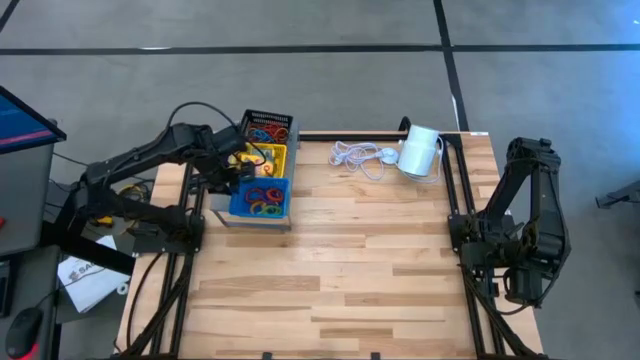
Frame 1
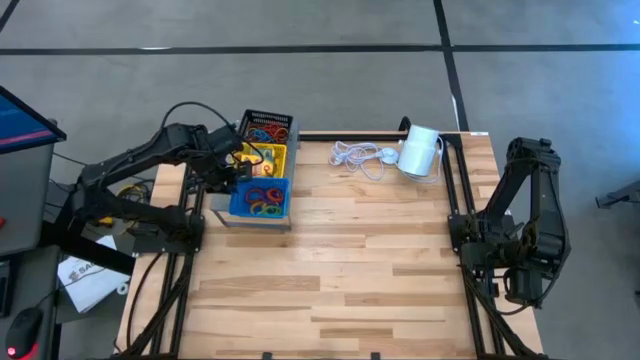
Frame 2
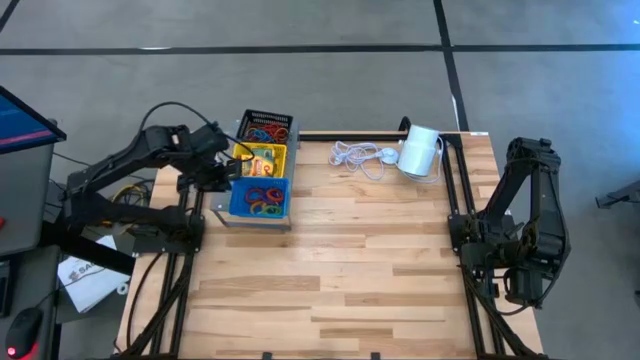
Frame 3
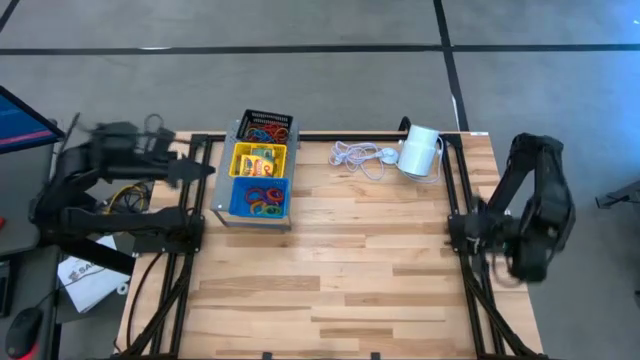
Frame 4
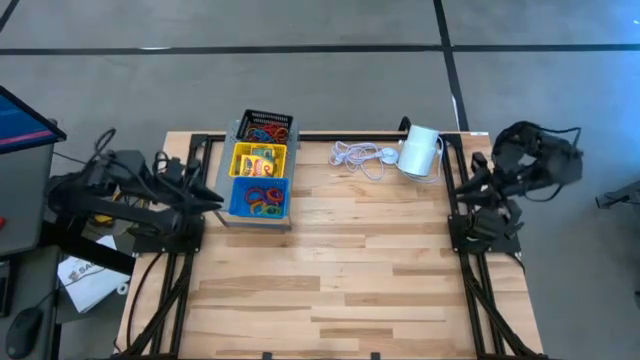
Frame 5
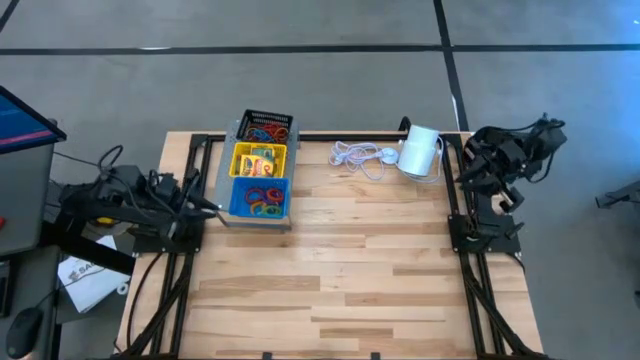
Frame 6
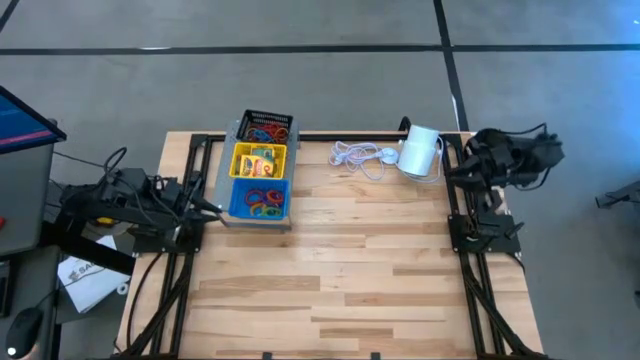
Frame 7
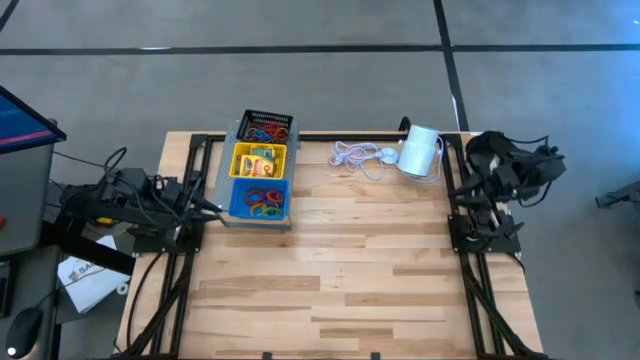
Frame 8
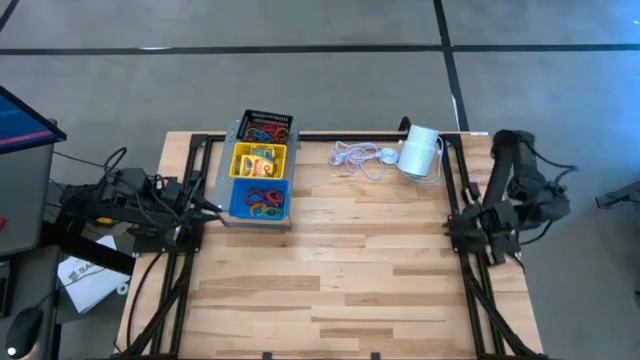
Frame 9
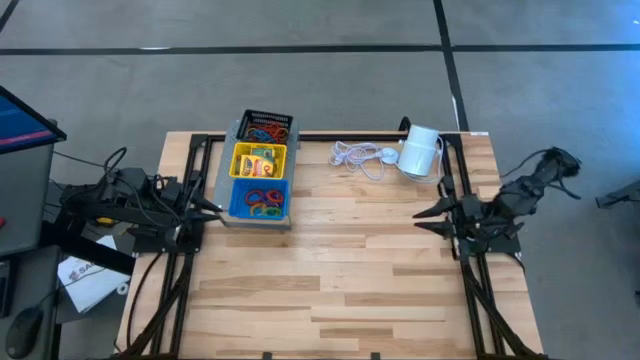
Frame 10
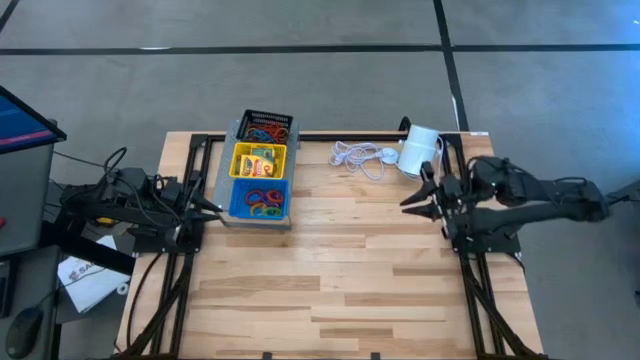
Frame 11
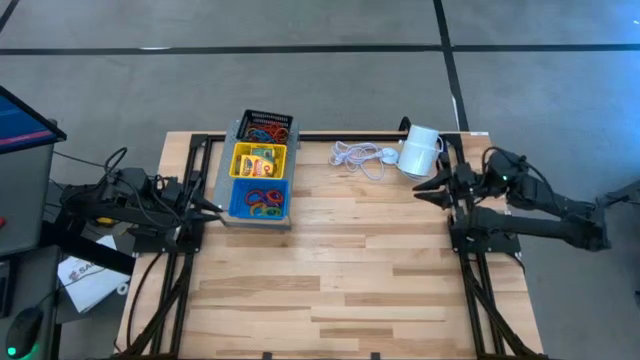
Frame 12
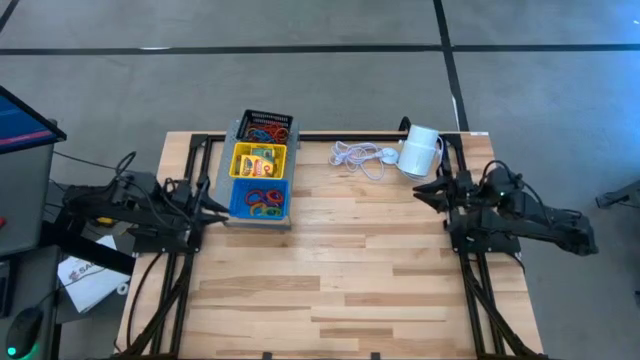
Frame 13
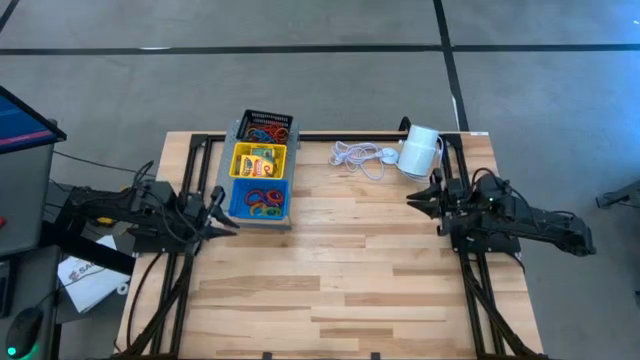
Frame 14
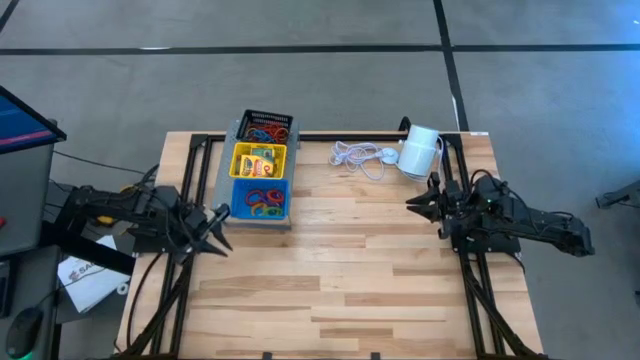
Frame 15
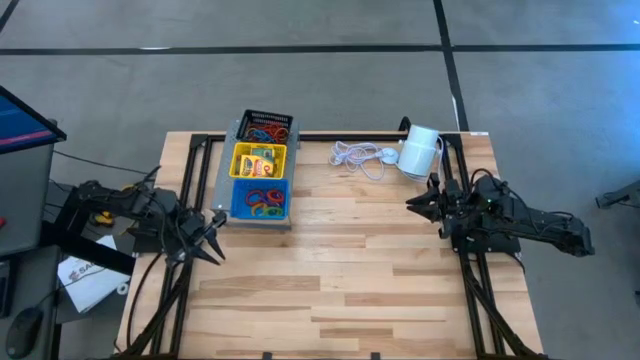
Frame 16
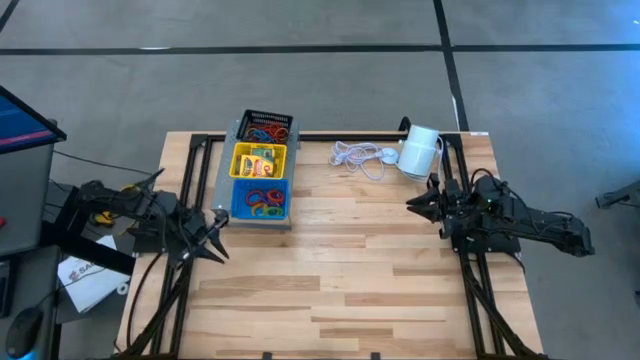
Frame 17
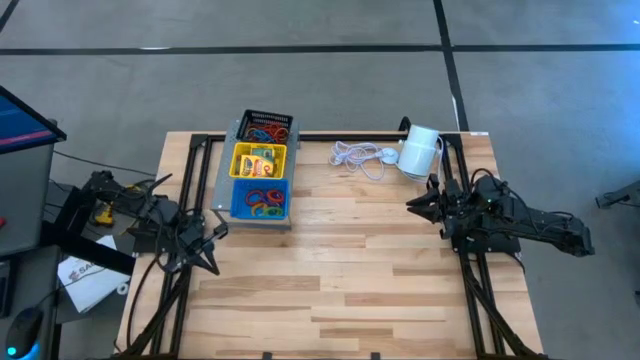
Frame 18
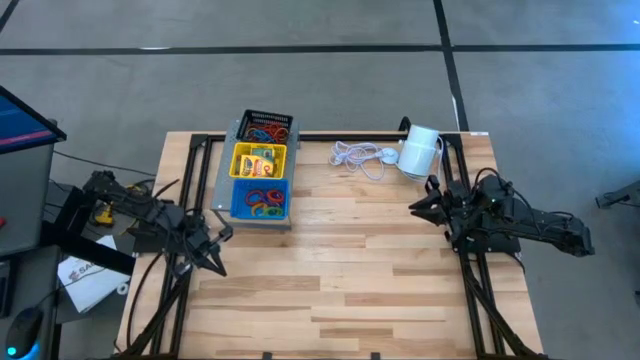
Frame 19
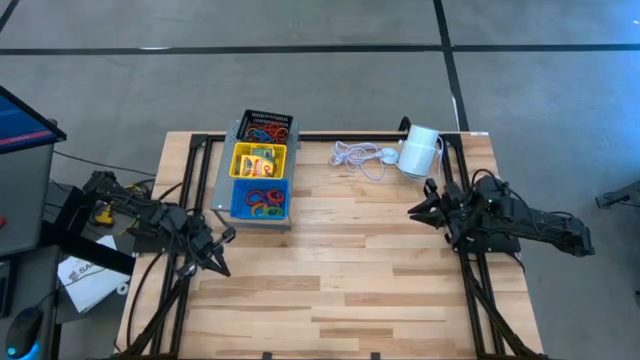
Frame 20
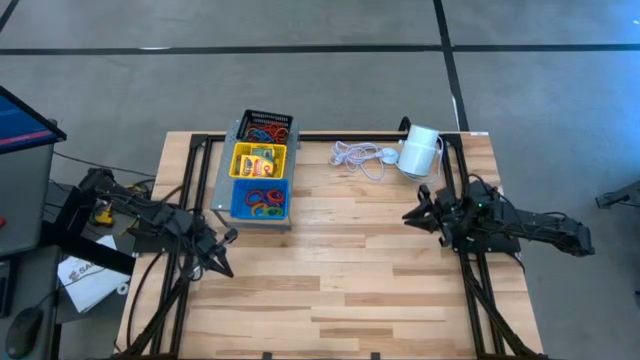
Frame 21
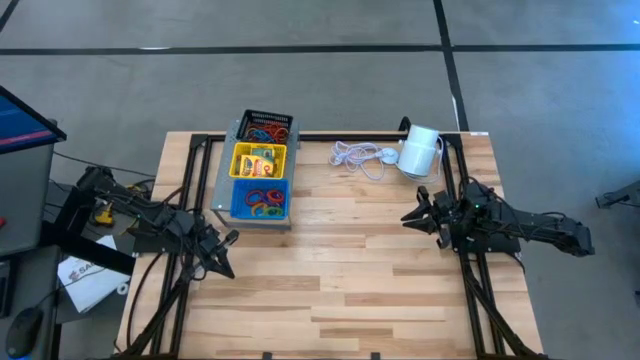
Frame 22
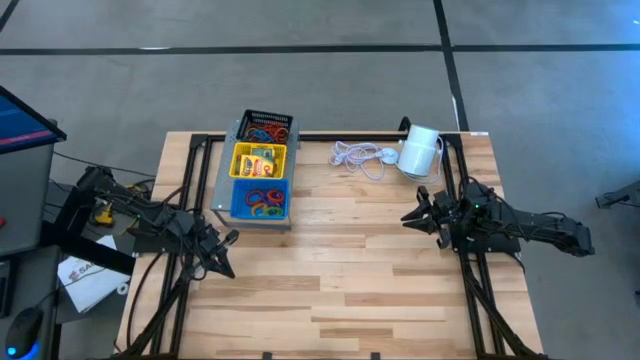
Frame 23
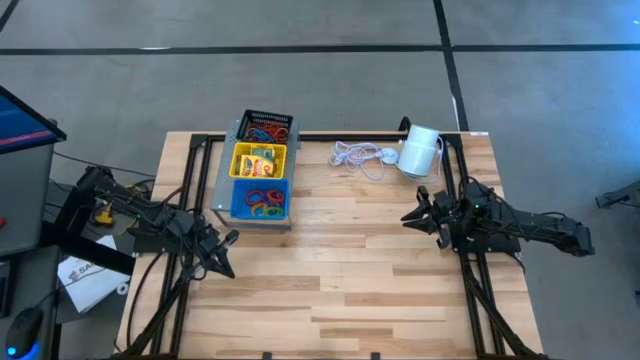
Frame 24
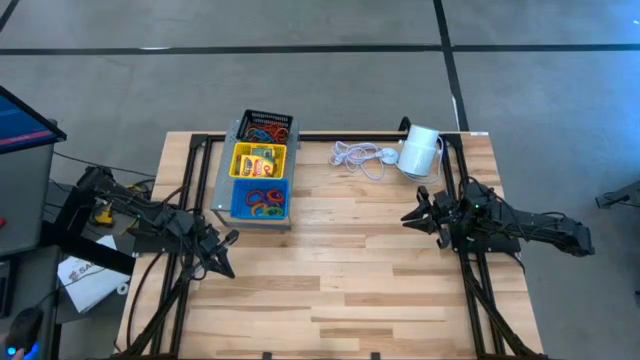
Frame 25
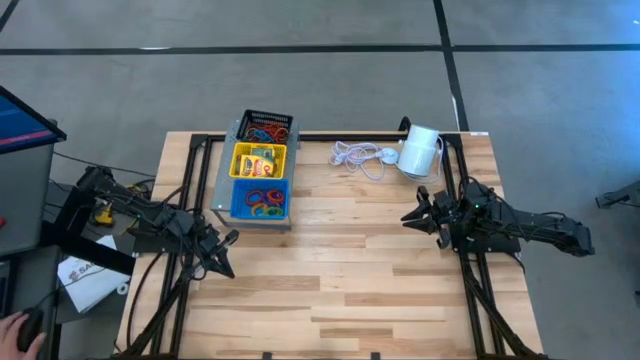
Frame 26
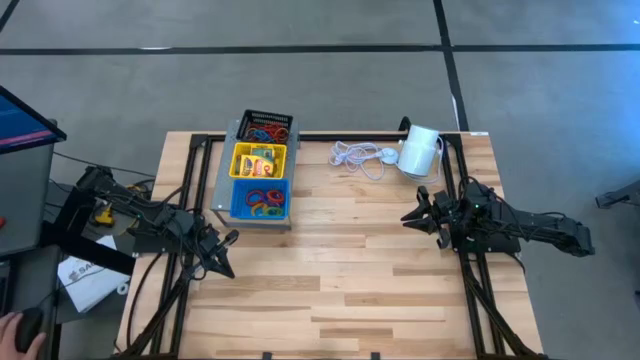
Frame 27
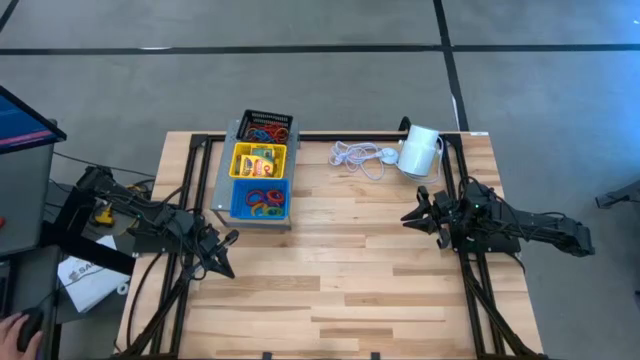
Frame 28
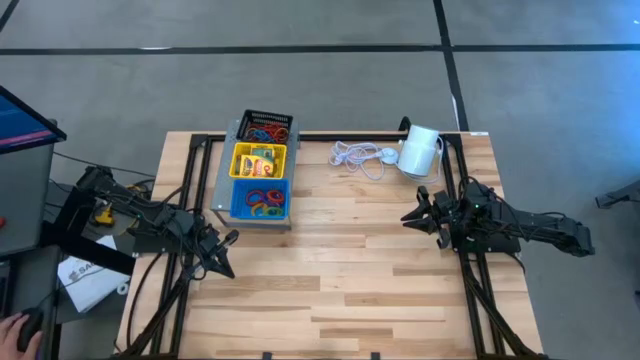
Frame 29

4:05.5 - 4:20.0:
Task: Pick & Place Office Desk Supplies
Return to Home Position
